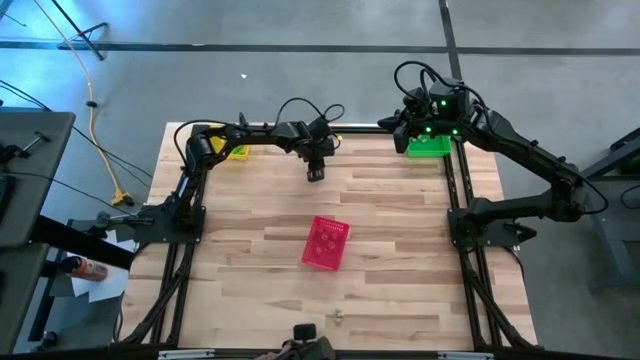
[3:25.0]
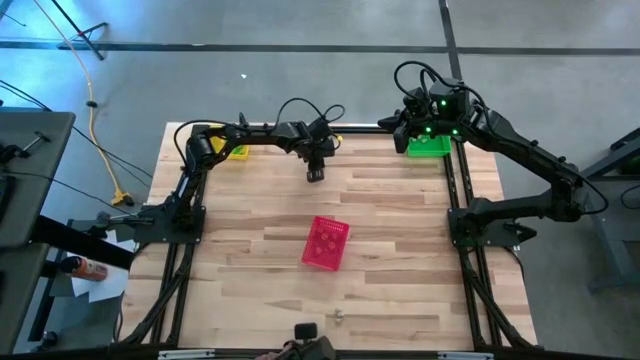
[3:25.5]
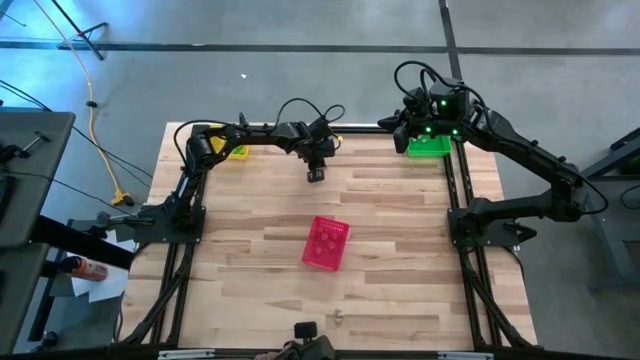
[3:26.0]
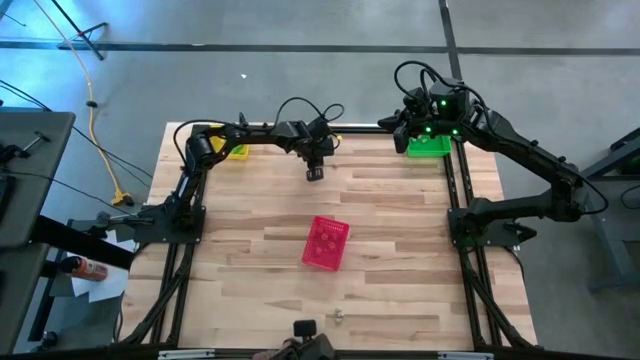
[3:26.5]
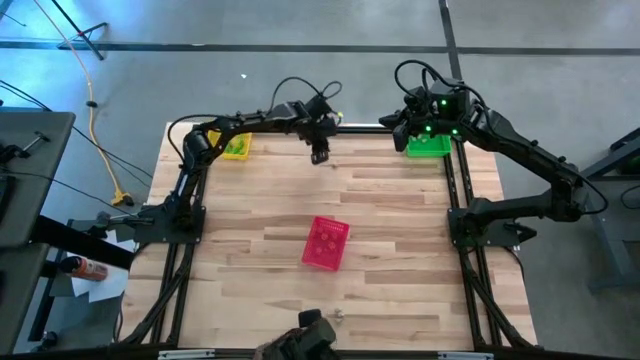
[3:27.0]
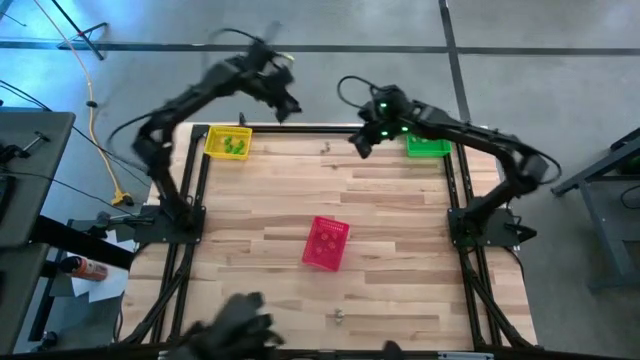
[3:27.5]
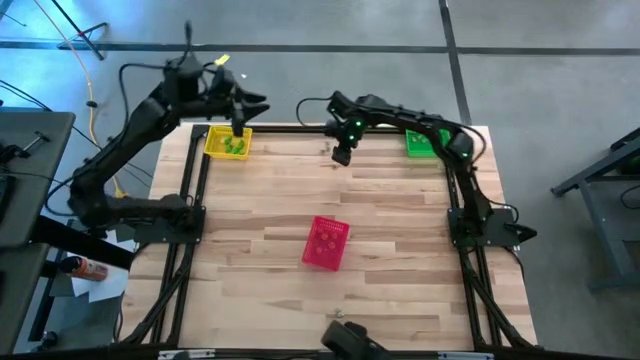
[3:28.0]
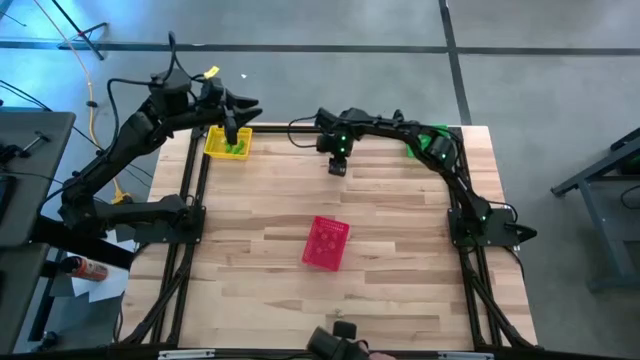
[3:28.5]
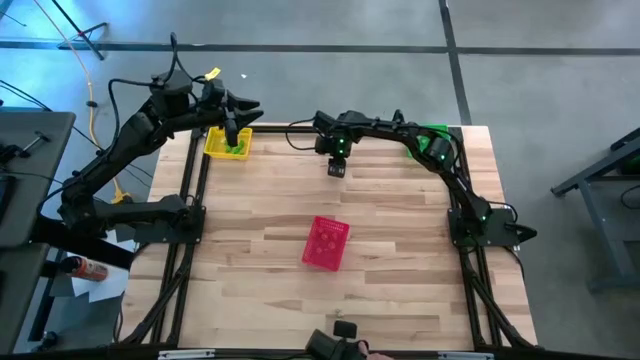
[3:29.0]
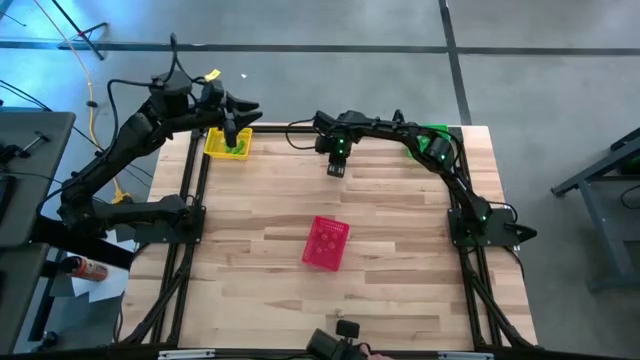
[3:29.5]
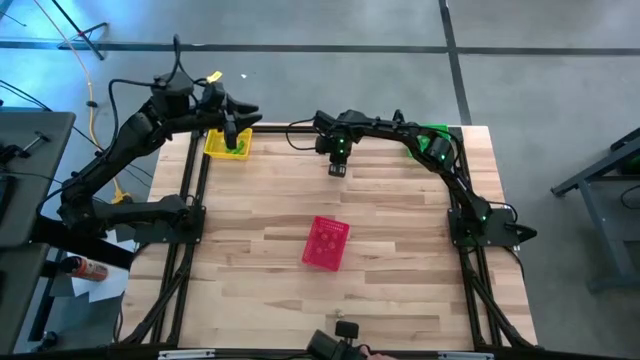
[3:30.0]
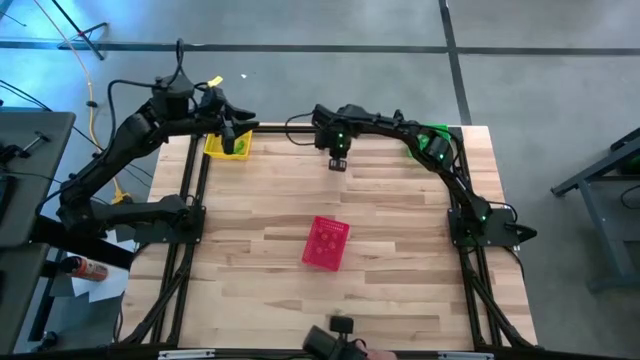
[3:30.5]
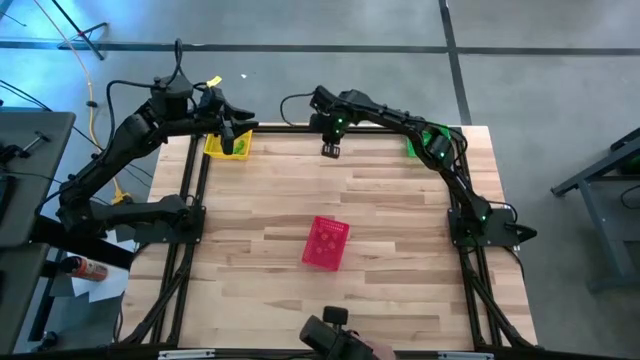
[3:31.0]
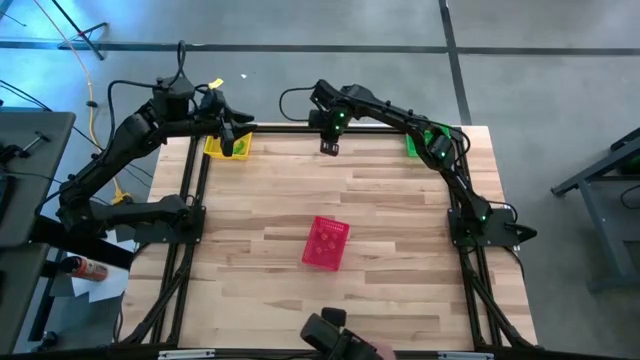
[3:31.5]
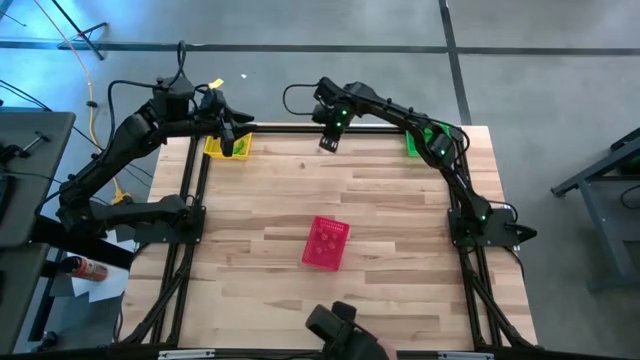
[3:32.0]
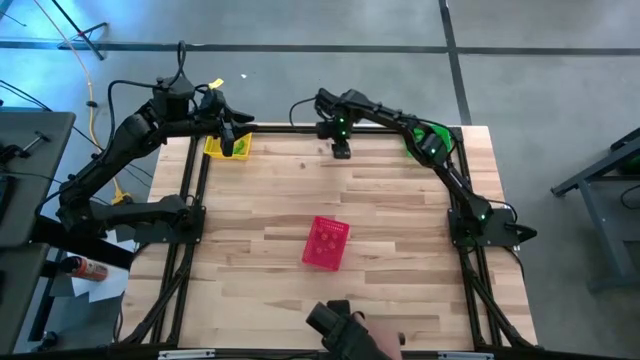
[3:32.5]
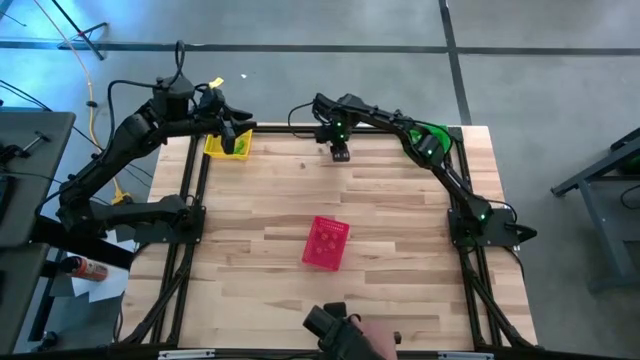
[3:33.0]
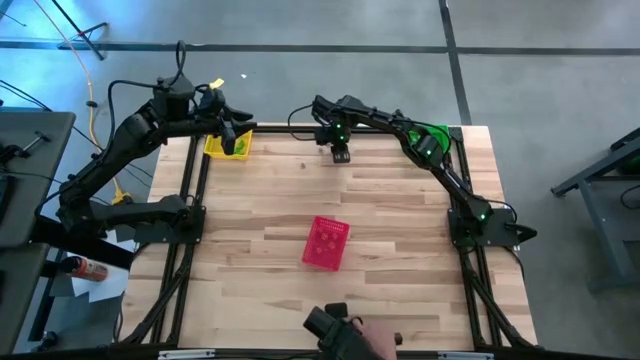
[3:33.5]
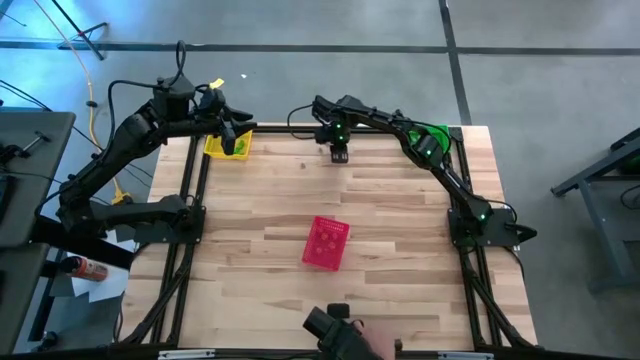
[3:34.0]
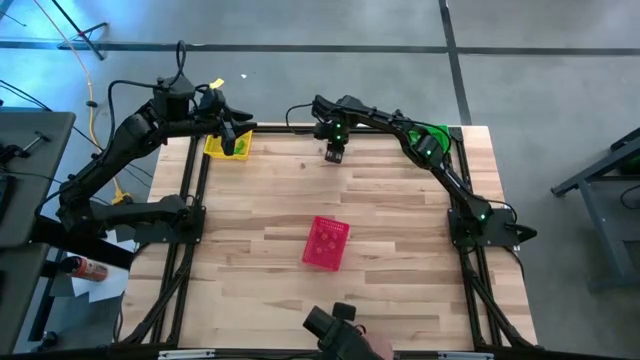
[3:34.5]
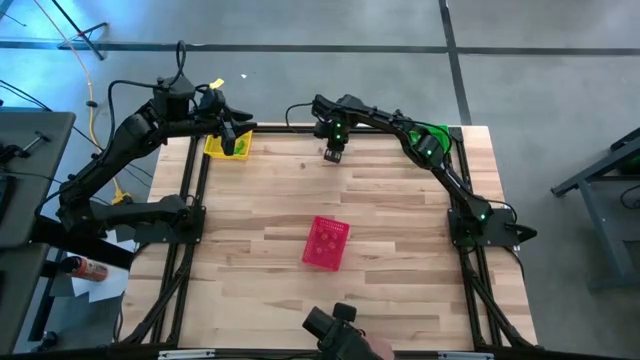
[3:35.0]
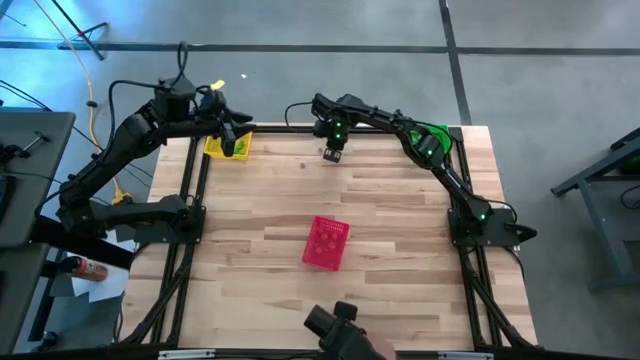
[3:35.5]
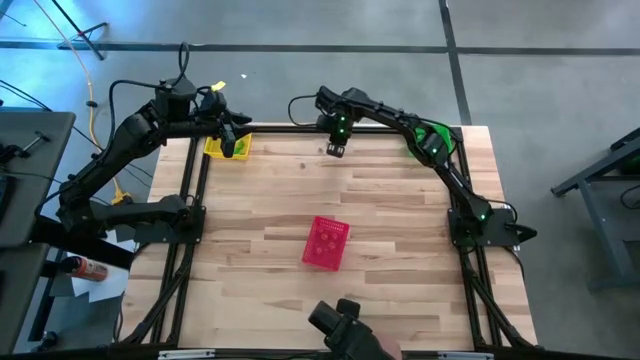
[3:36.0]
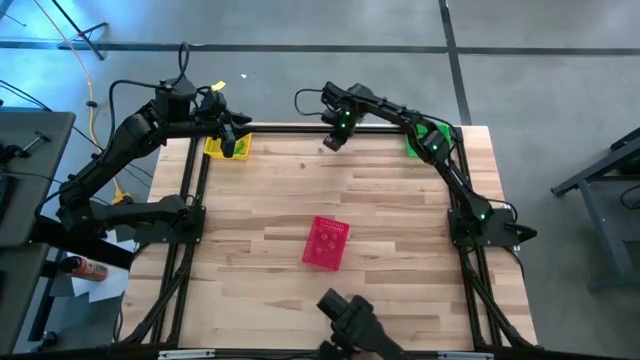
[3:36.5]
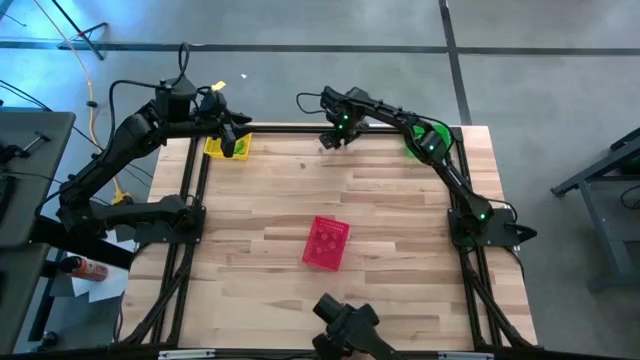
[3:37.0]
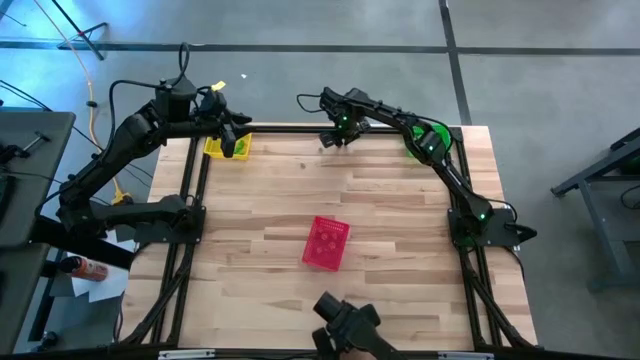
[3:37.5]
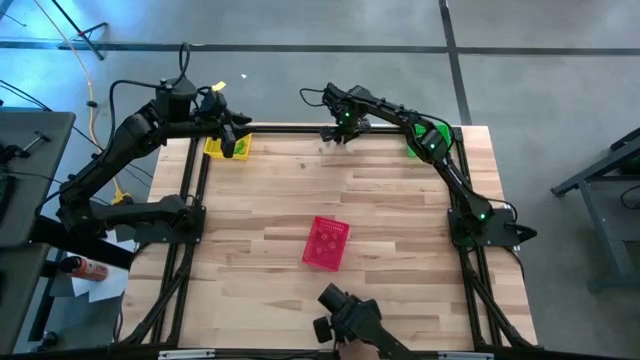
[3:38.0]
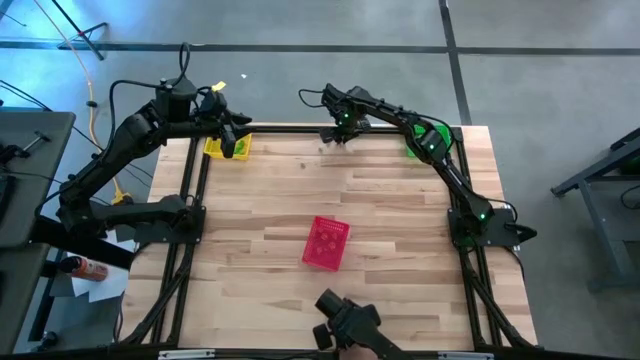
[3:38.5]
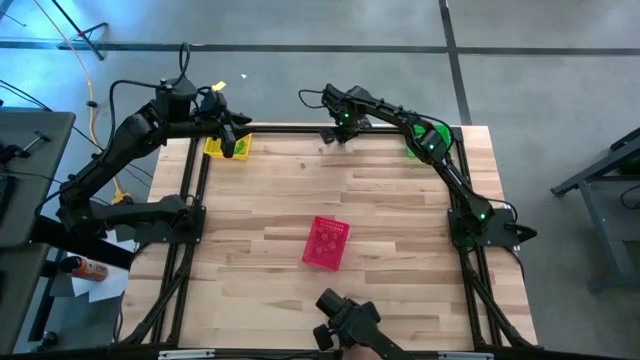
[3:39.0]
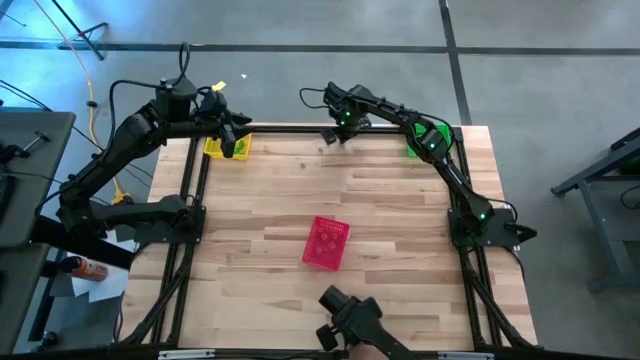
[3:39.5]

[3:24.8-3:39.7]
Task: Sort Halloween decoration
Put the white skull toy into the green bin

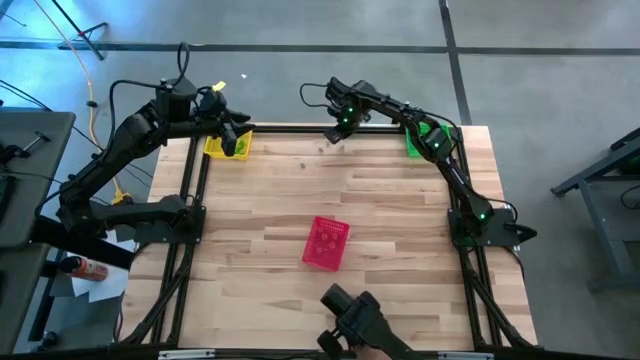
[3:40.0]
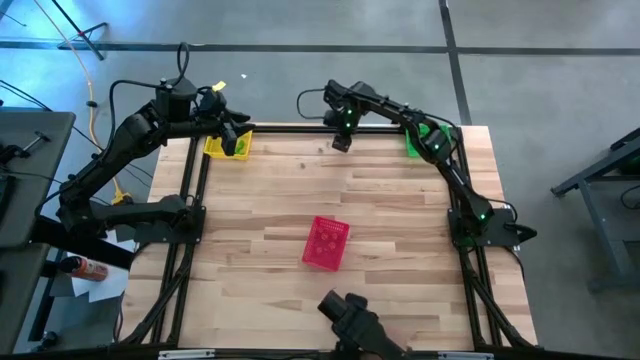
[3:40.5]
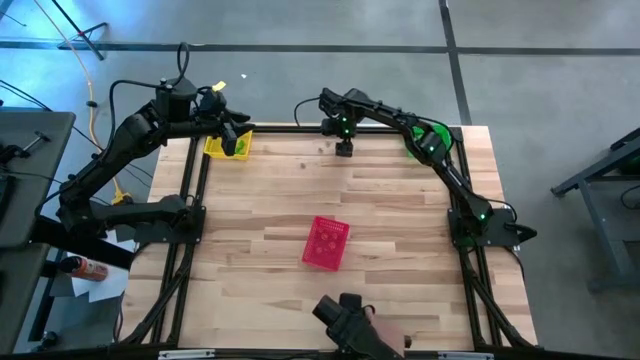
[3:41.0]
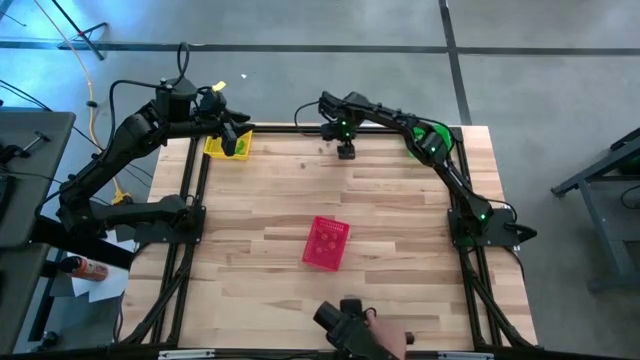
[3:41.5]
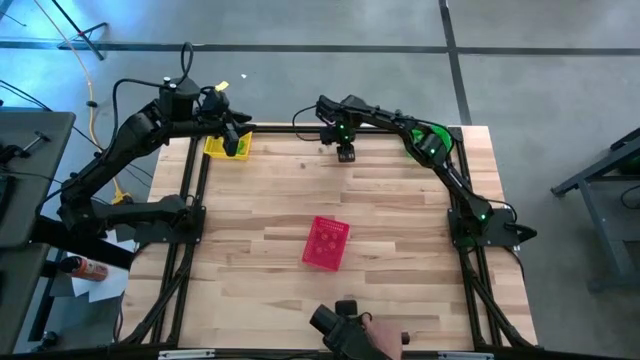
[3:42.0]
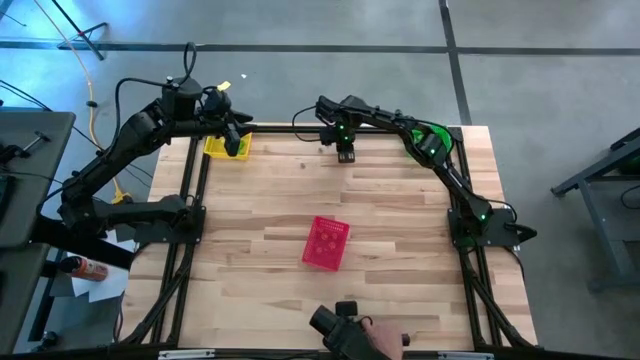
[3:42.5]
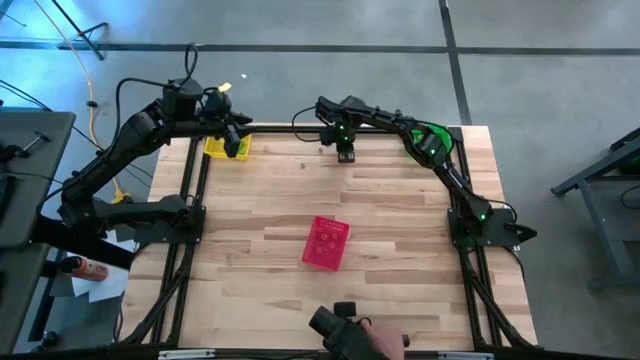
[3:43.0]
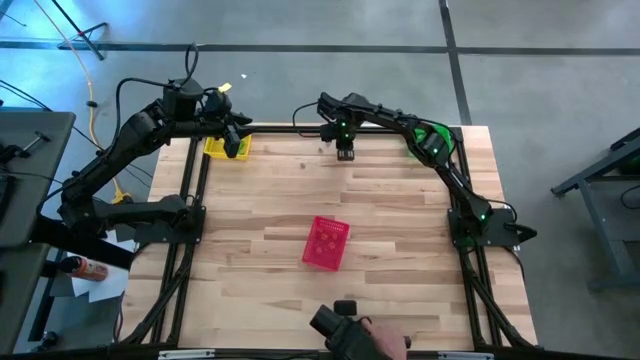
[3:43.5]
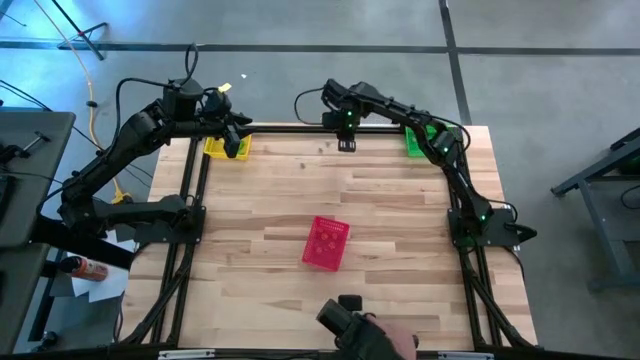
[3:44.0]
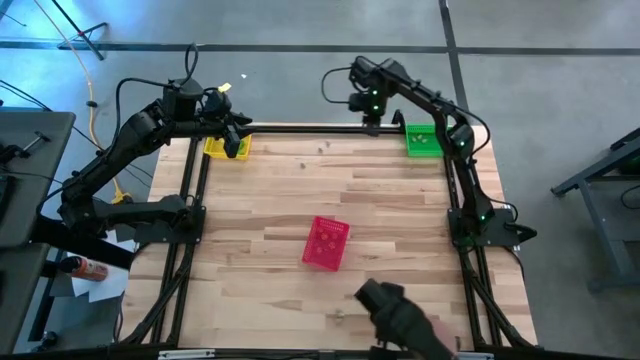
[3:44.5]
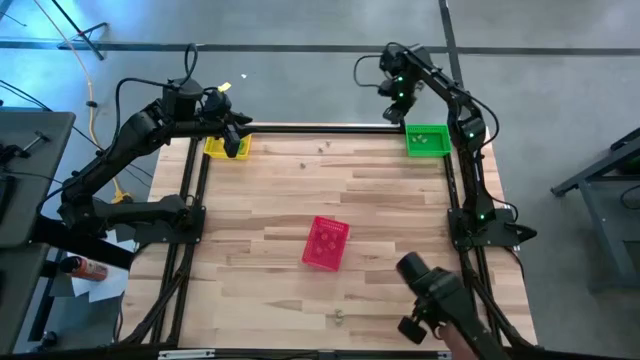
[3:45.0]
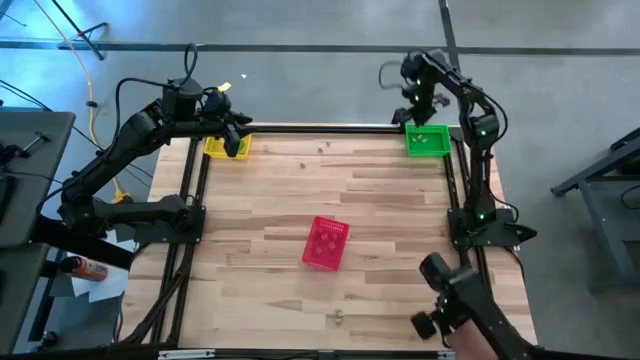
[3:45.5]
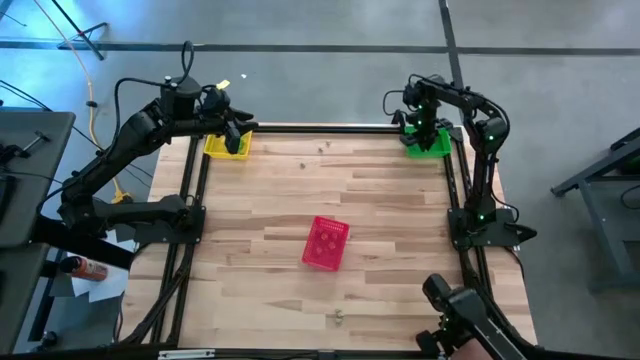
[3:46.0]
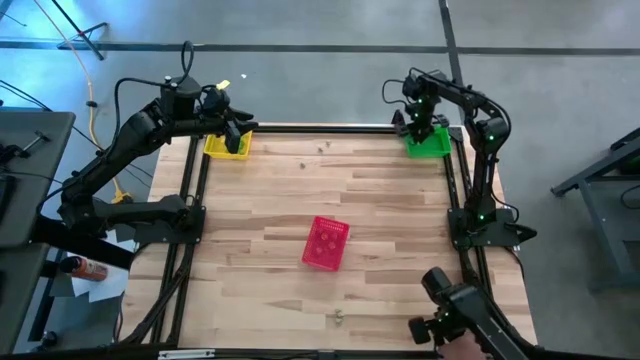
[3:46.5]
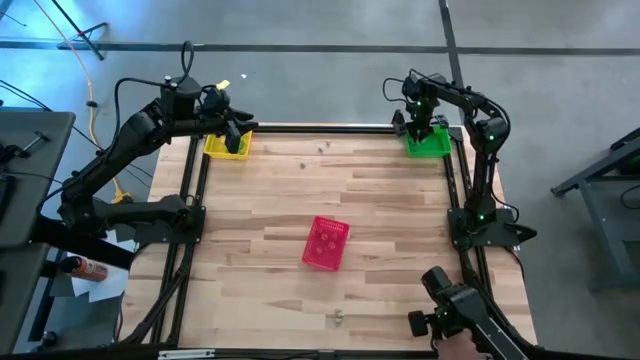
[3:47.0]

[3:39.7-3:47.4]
Put the white skull toy into the green bin
